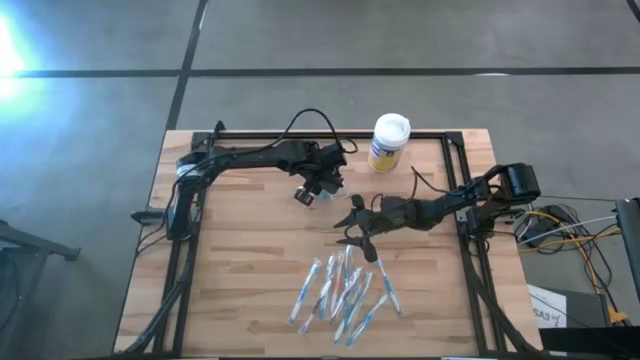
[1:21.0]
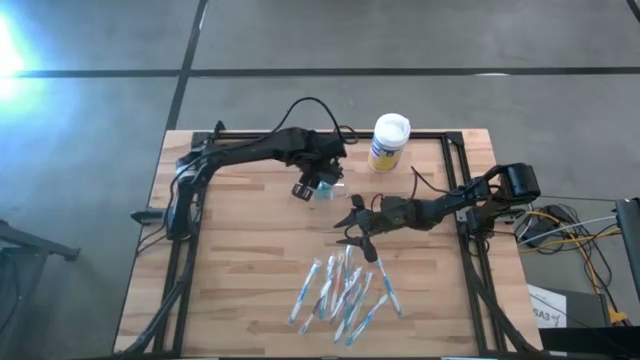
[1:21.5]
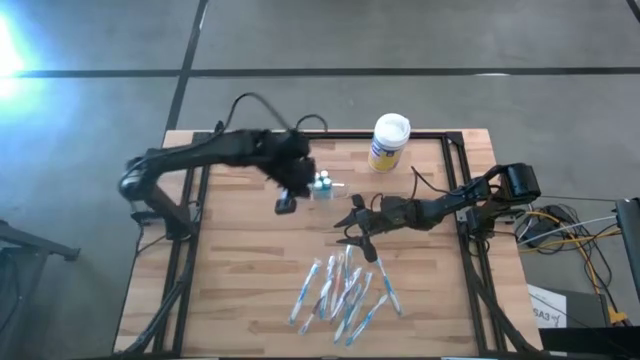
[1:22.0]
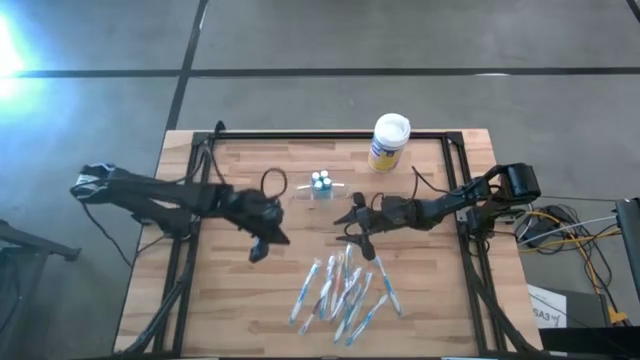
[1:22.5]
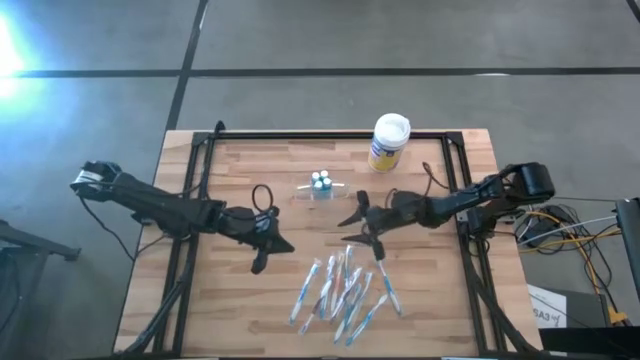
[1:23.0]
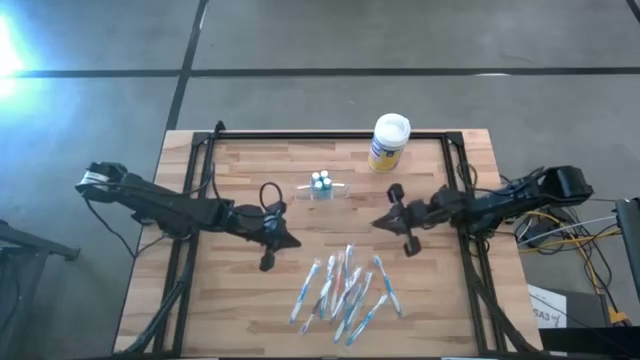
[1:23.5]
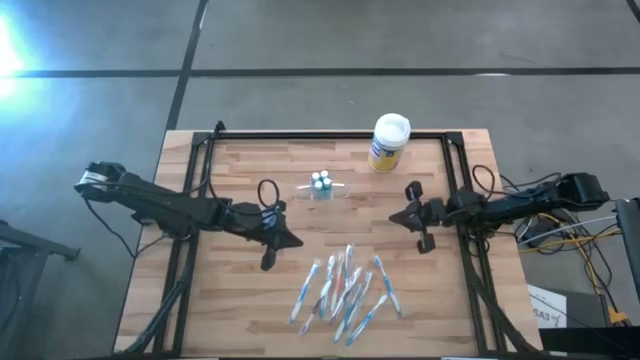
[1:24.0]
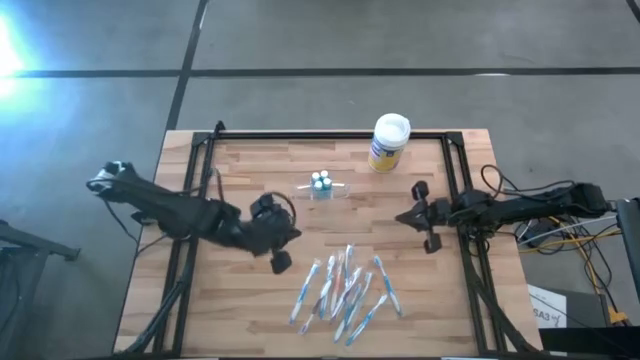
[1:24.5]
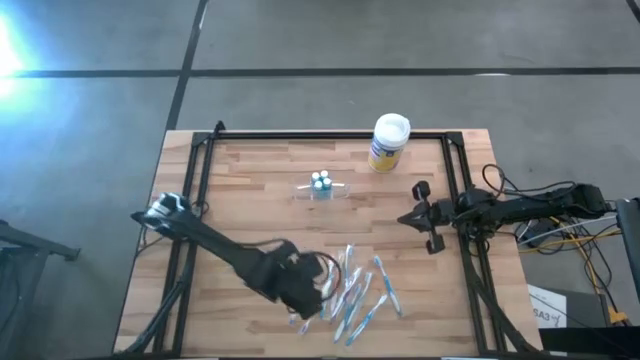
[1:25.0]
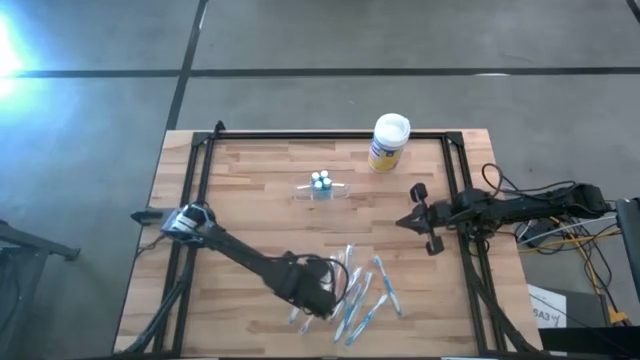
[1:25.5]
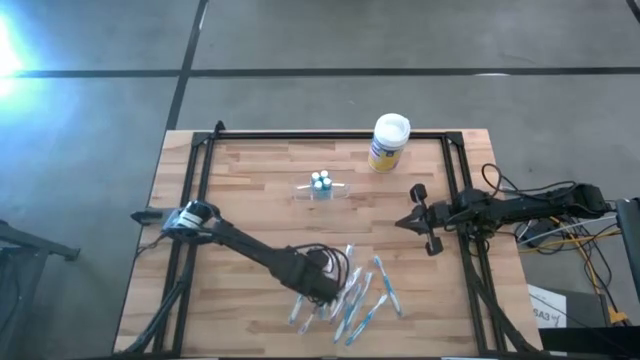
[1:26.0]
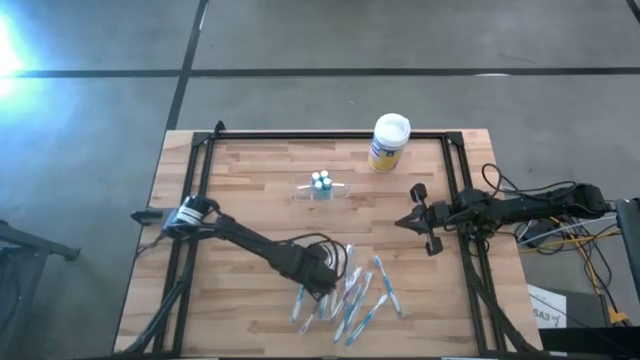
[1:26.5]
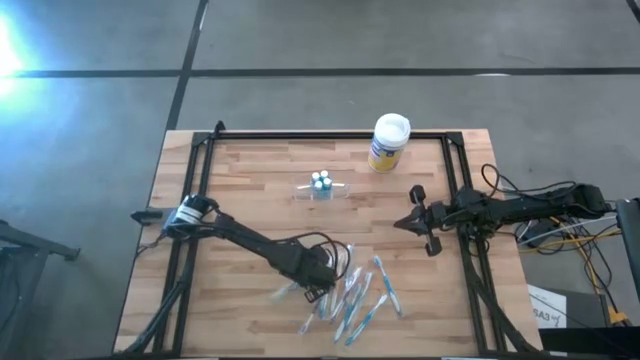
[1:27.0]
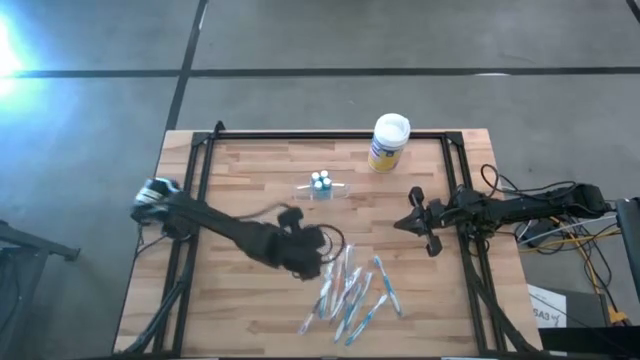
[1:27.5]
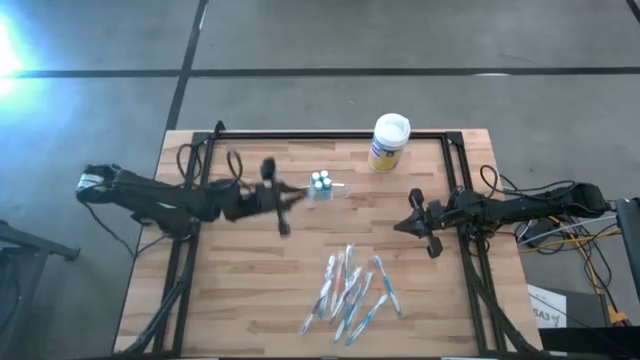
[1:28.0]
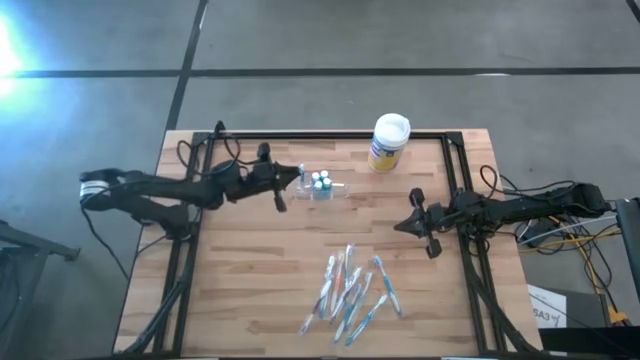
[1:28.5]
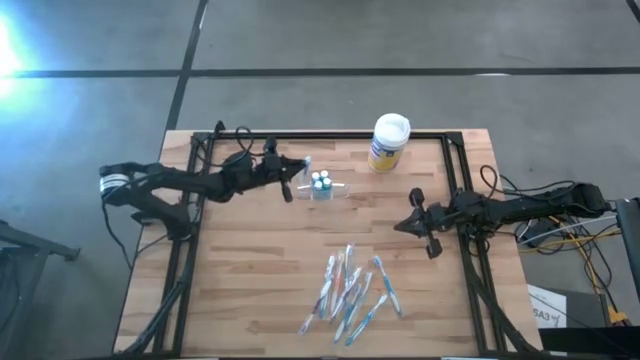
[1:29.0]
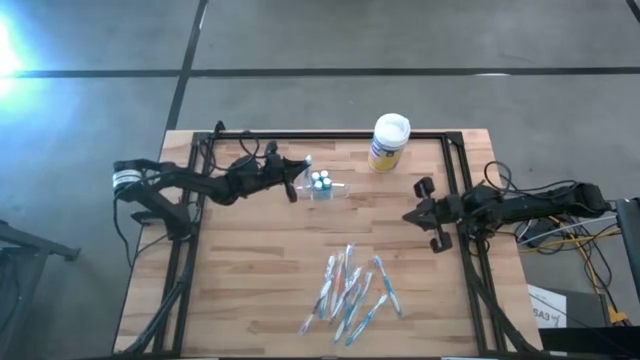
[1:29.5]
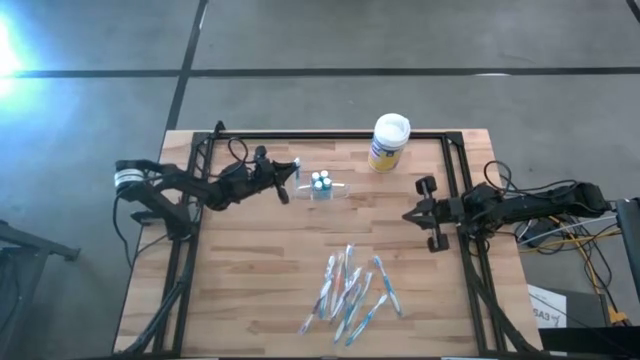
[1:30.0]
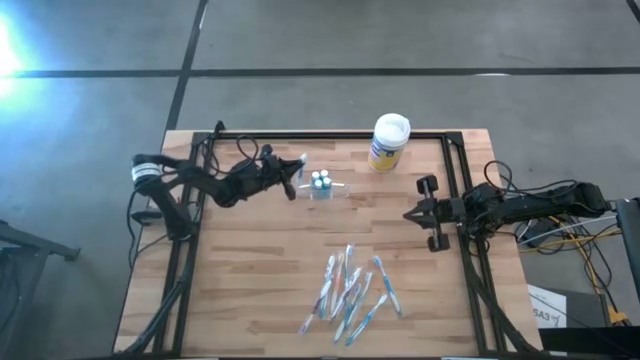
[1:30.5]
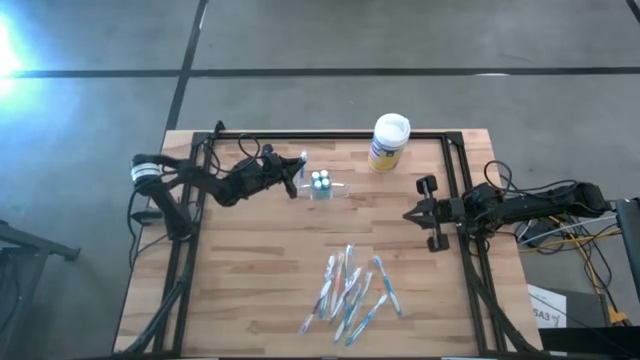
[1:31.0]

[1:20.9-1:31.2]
Task: Pick & Place toothbrushing station
Put the blue toothbrush into the transparent organizer

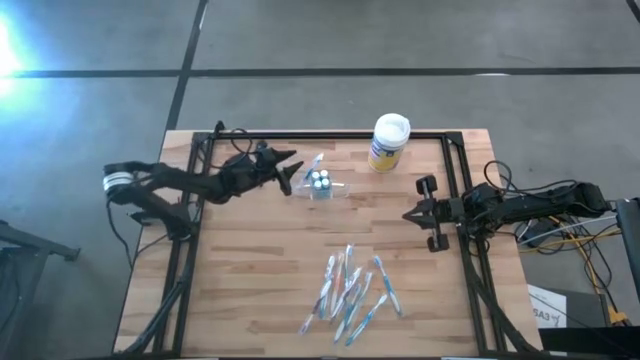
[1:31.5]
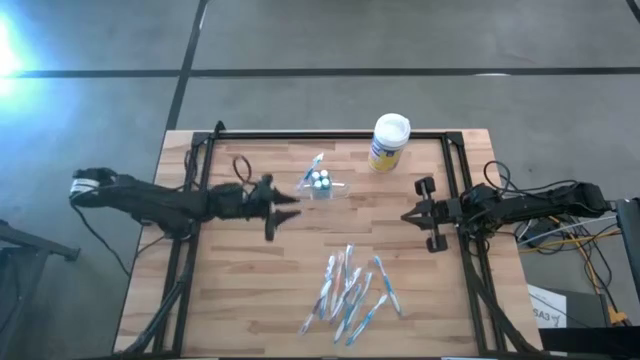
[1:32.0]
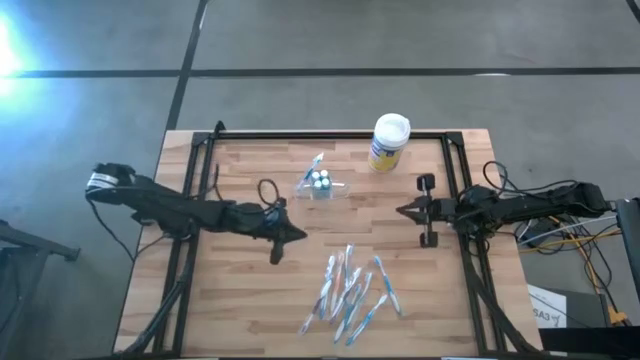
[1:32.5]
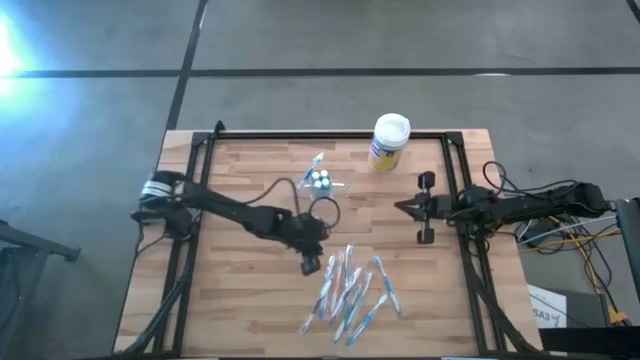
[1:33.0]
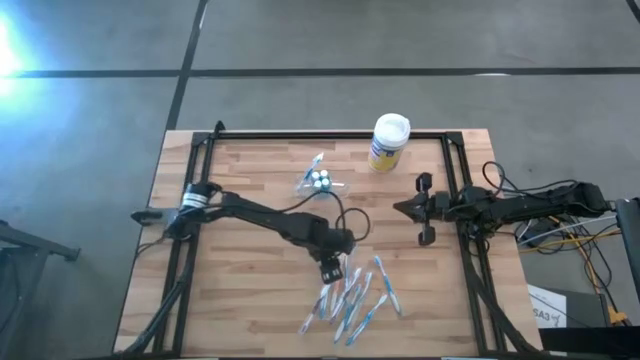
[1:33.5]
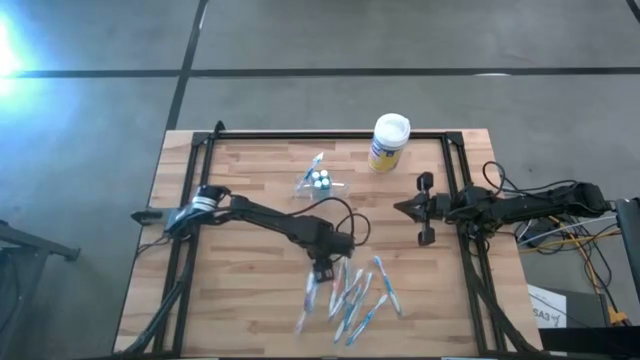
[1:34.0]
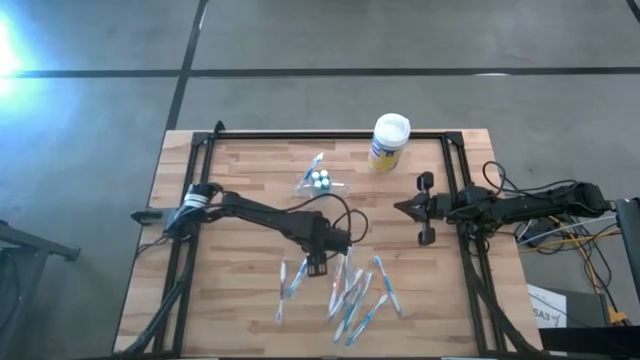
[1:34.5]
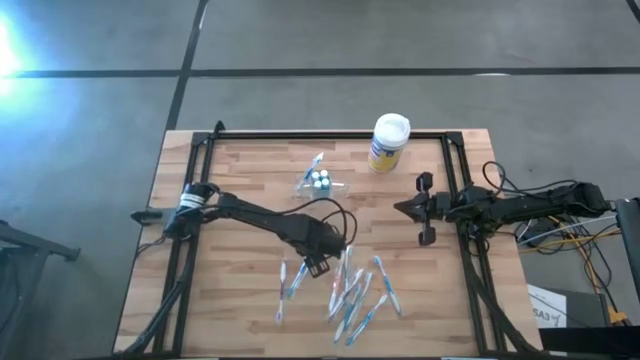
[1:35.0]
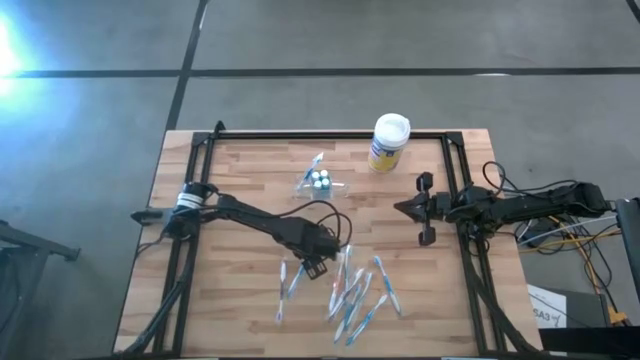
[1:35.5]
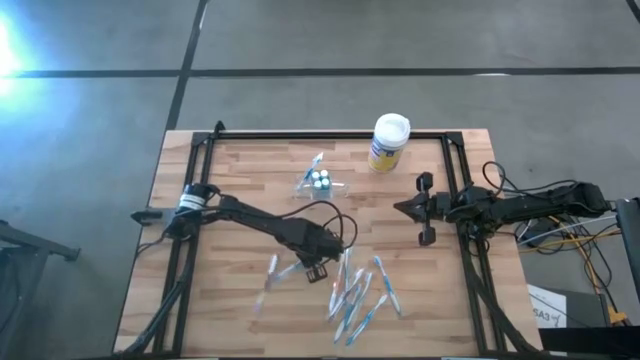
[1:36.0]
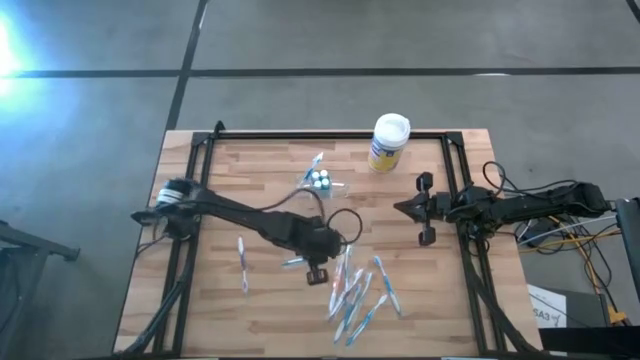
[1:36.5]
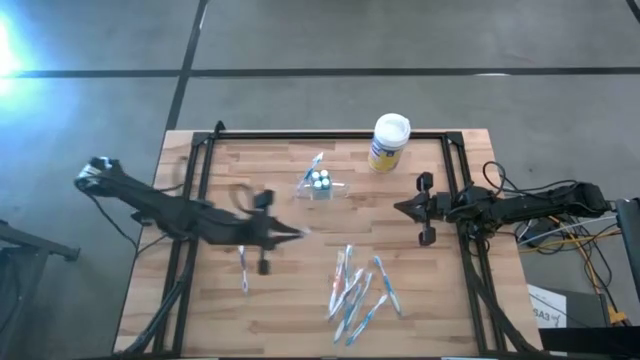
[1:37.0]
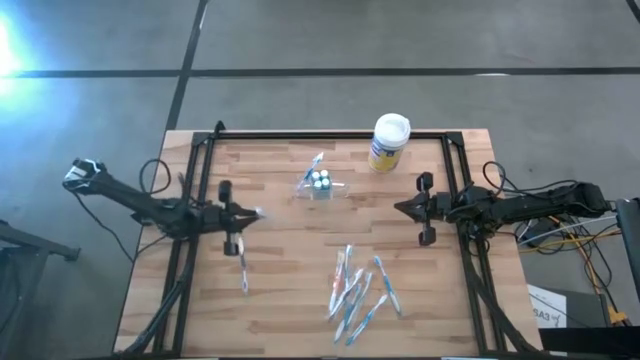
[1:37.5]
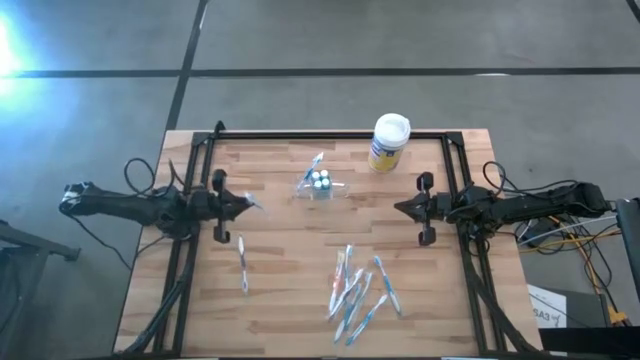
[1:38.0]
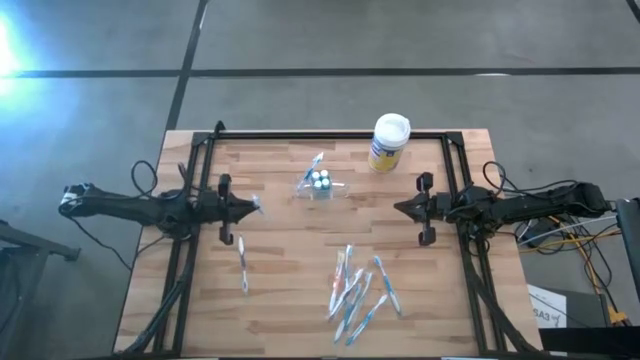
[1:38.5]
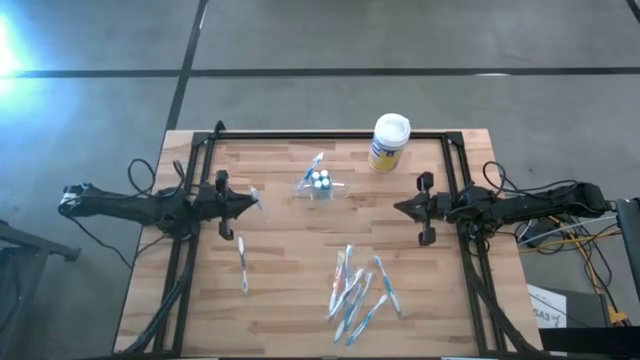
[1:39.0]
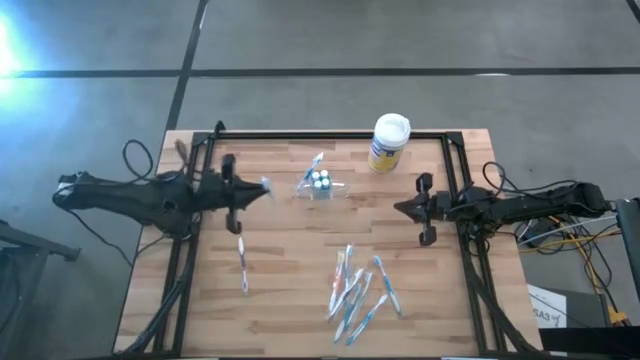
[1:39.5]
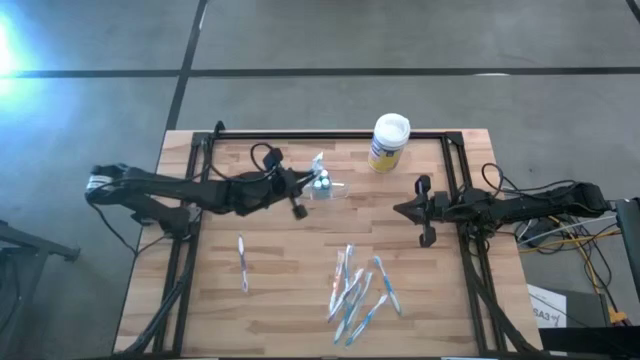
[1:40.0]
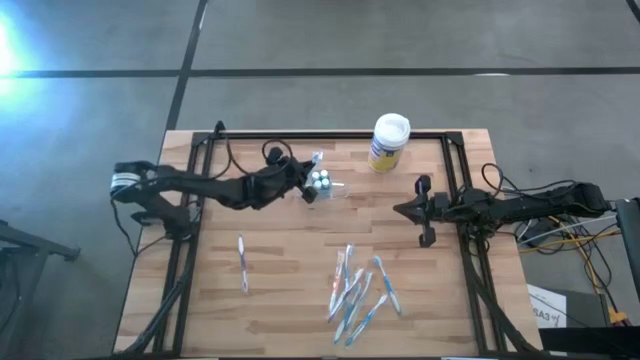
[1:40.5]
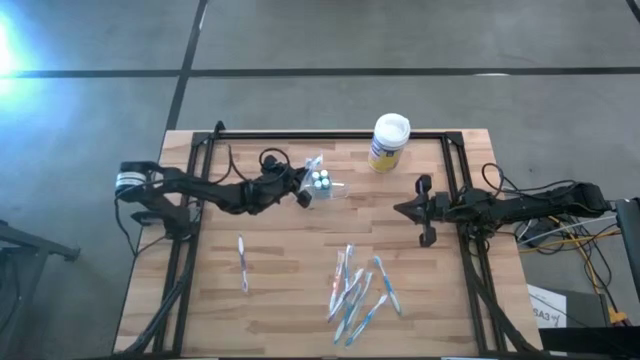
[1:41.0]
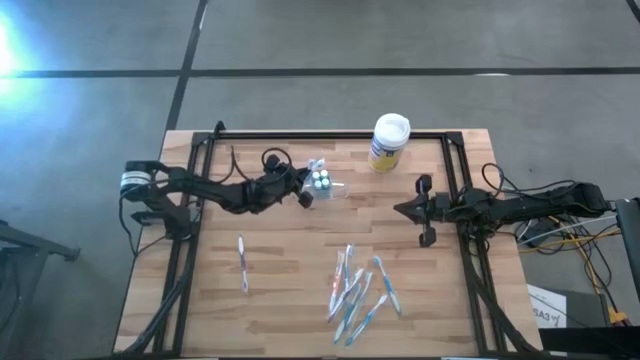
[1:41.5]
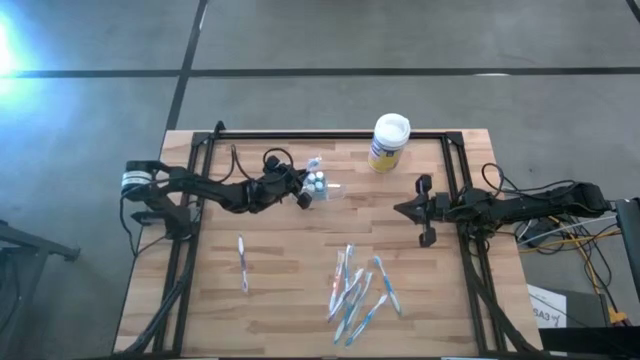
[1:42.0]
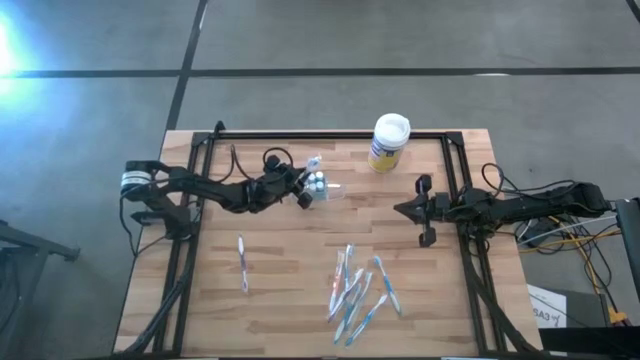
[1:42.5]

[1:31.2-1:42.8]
Put the blue toothbrush into the transparent organizer
